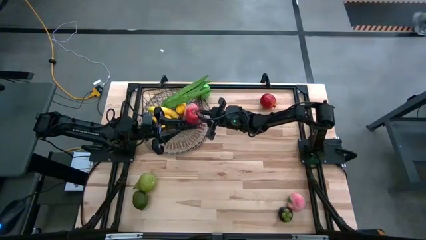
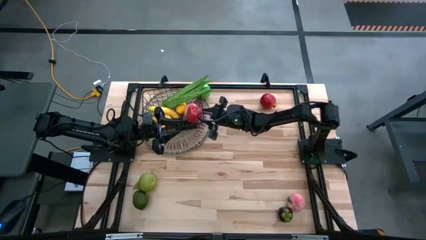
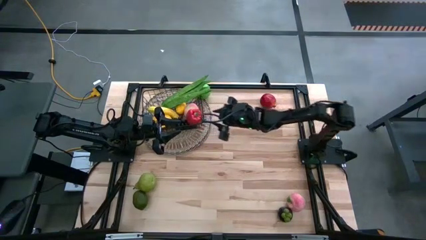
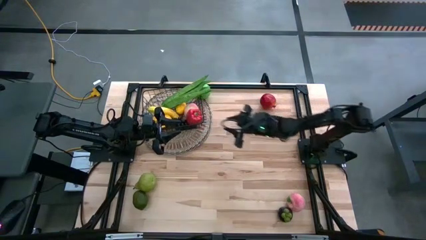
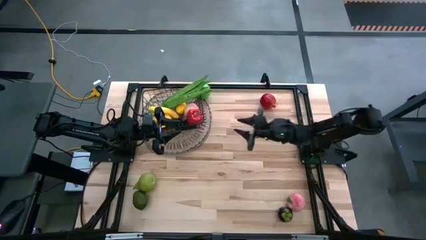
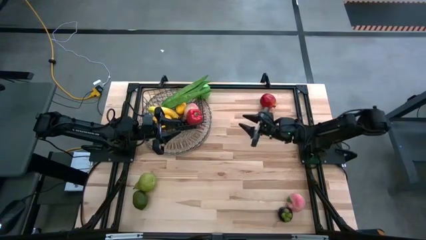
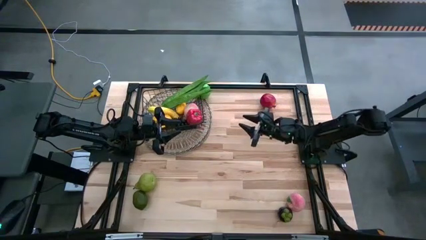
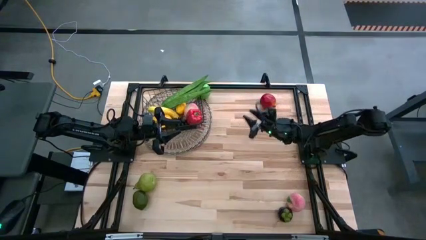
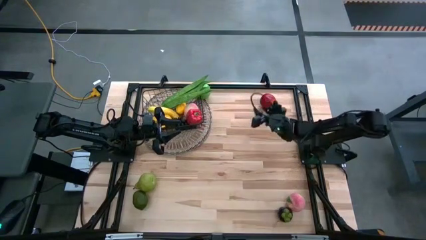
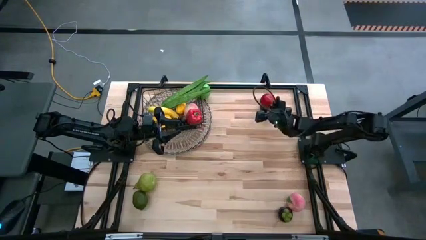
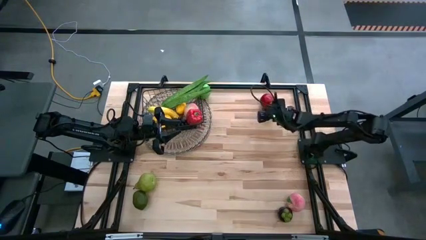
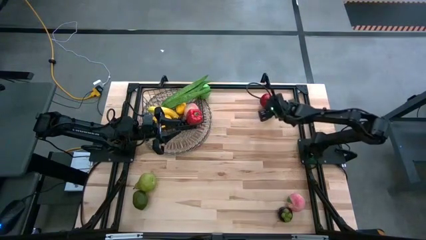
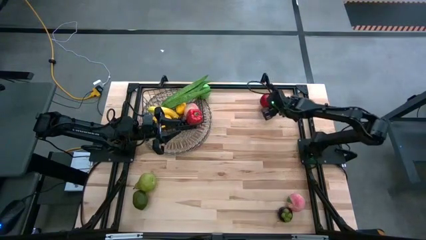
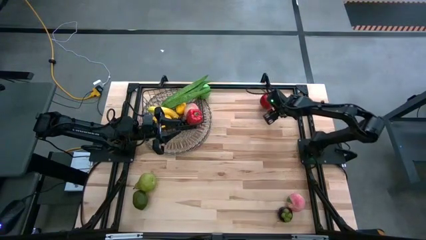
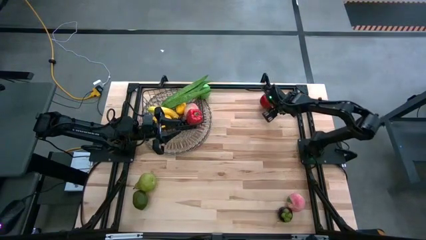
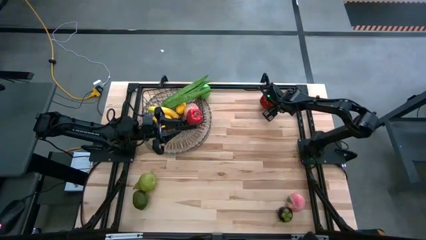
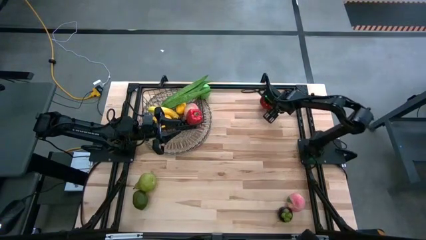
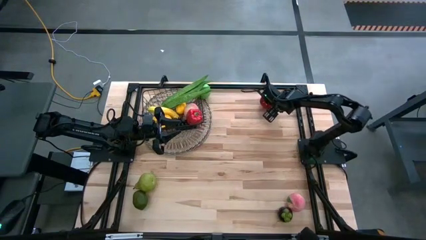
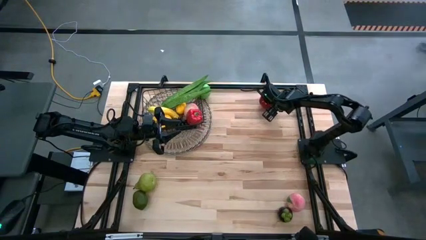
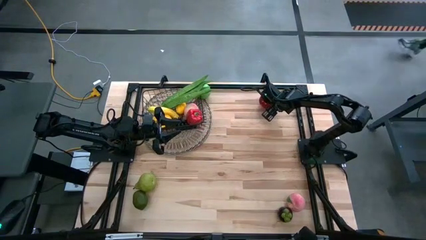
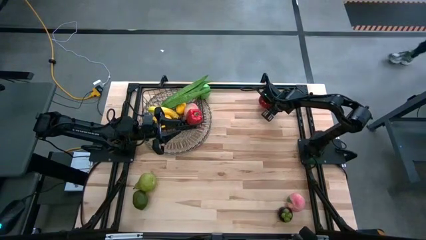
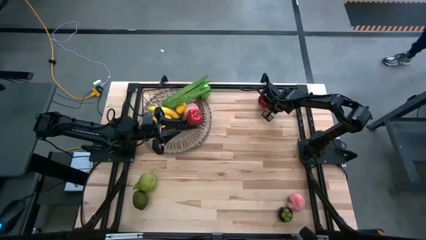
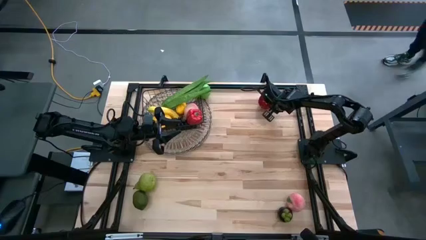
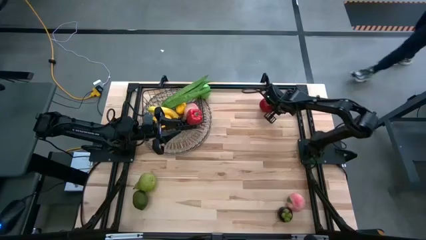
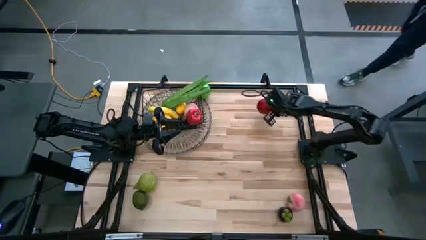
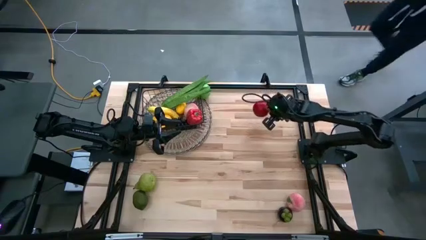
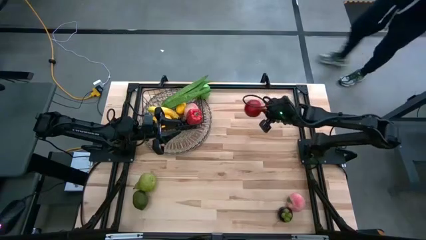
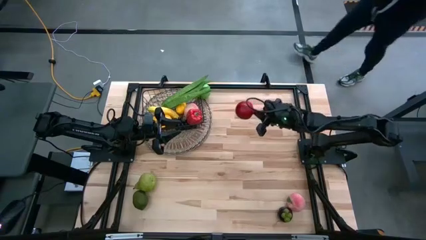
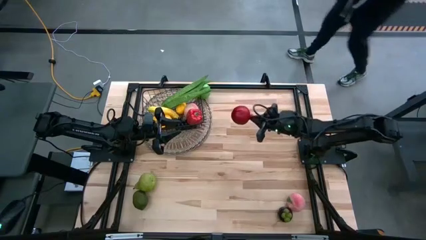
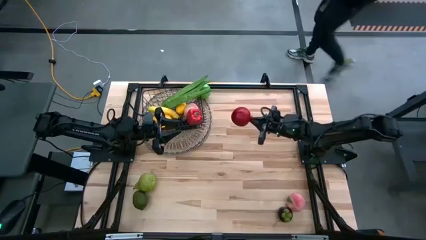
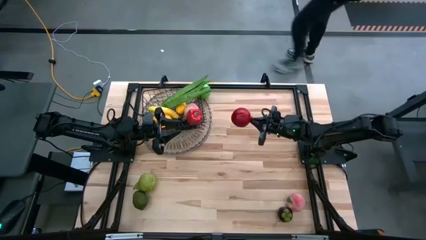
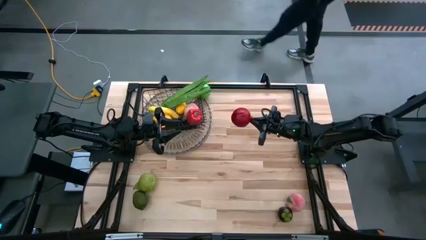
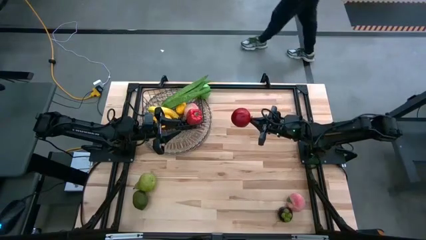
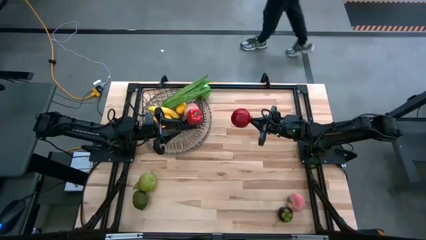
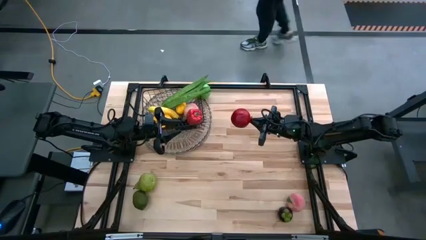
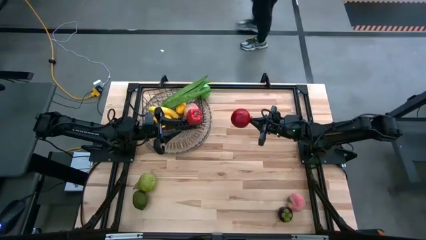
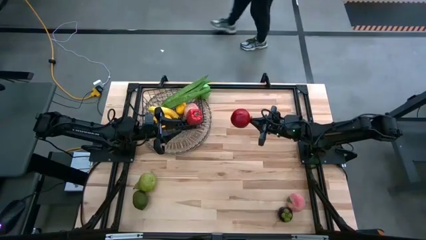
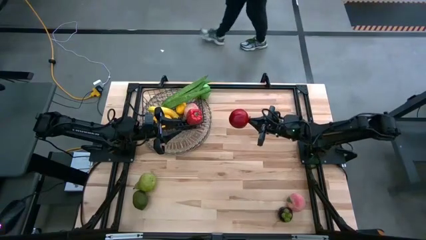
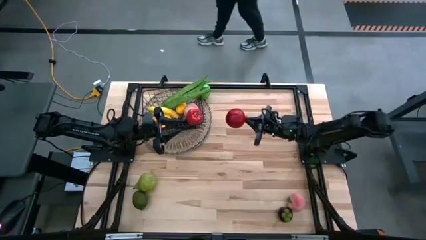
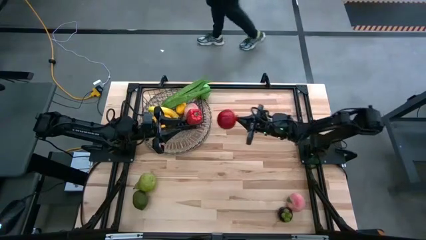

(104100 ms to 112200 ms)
Task: Build produce basket
Put the red pomegranate into the wire basket

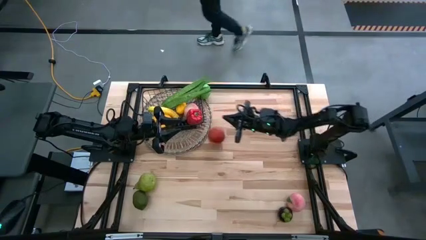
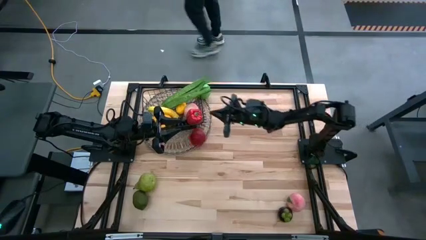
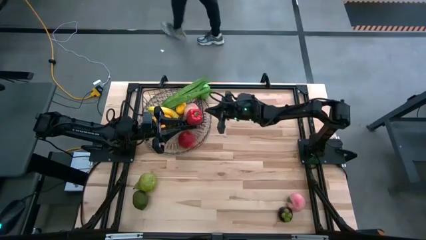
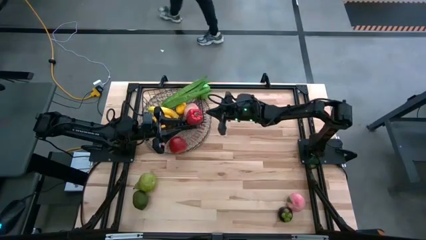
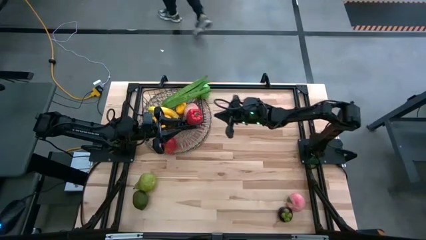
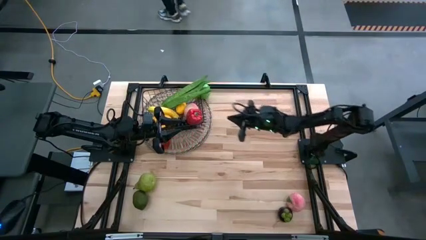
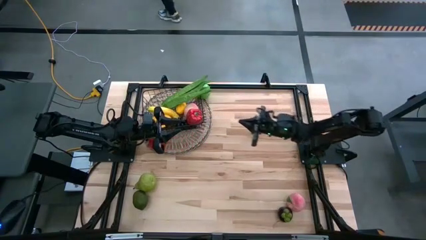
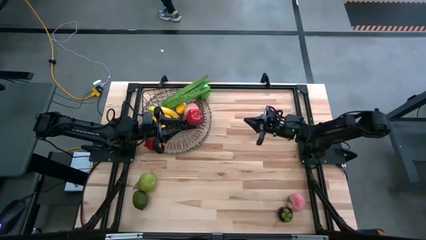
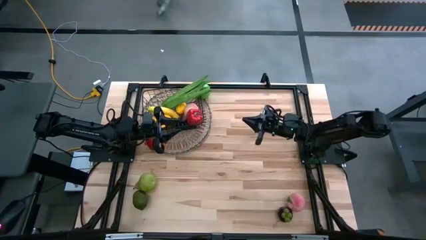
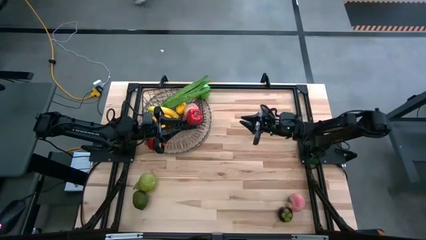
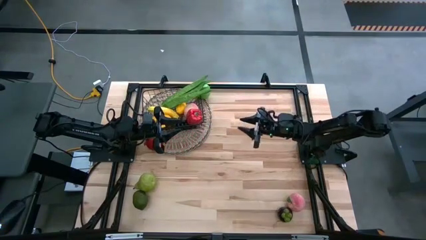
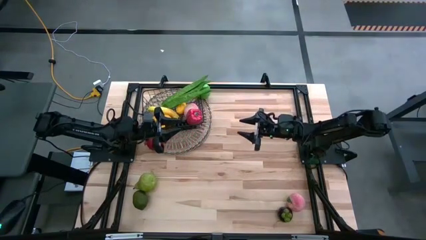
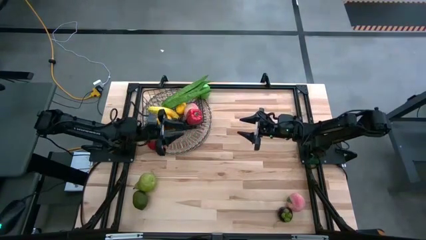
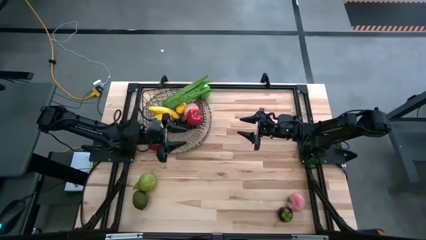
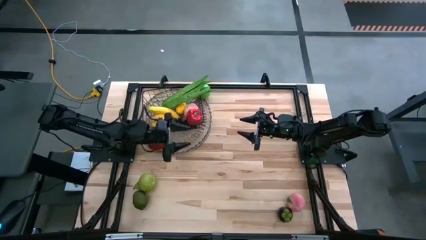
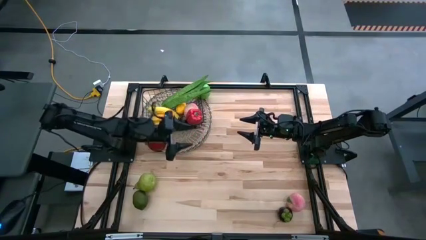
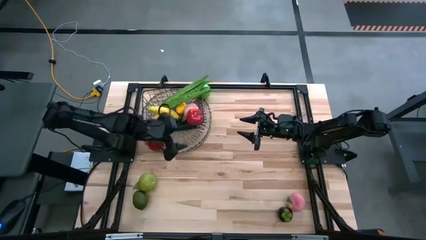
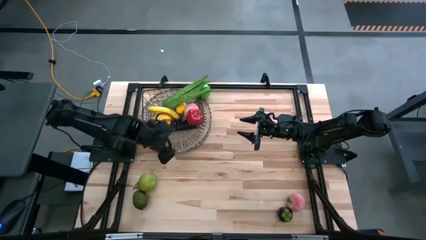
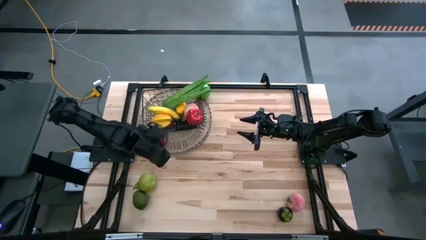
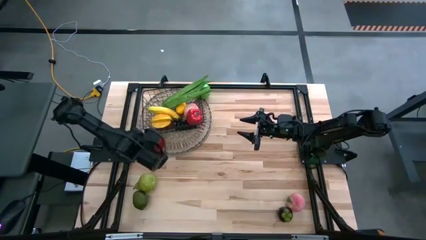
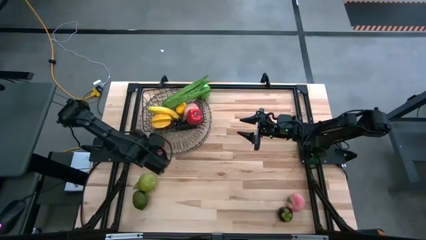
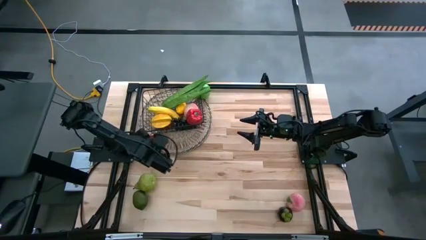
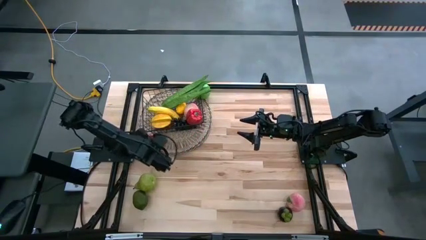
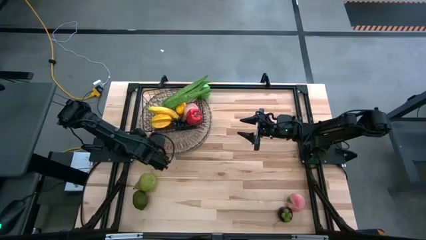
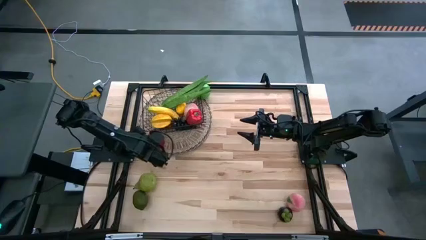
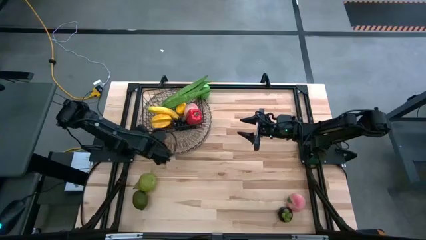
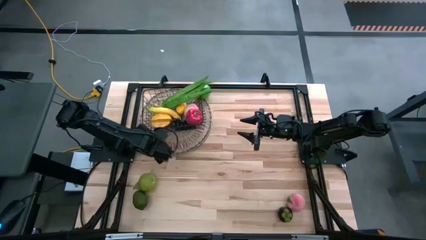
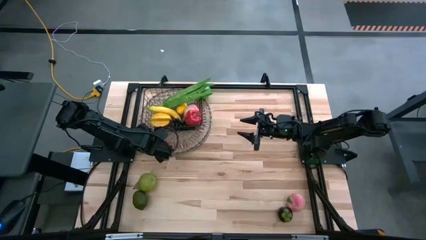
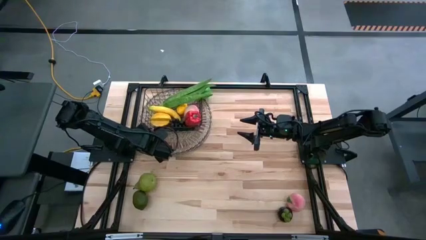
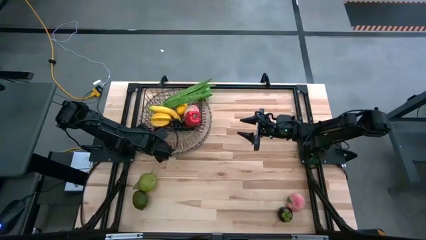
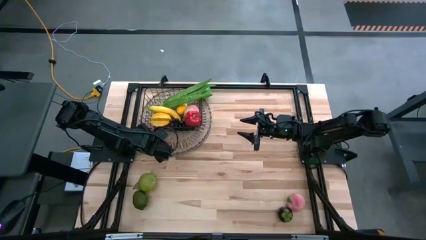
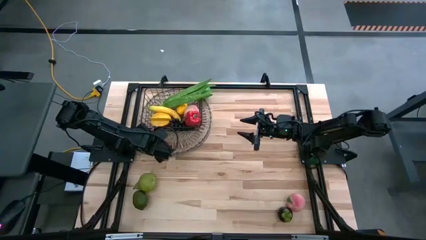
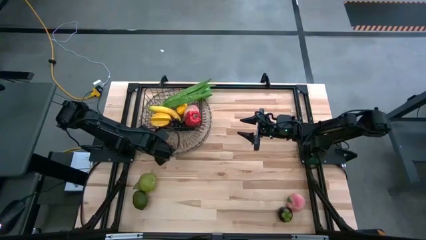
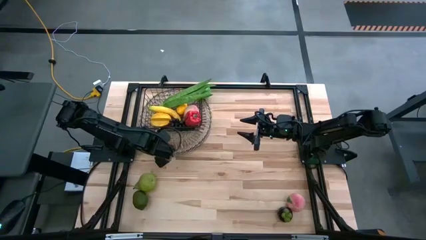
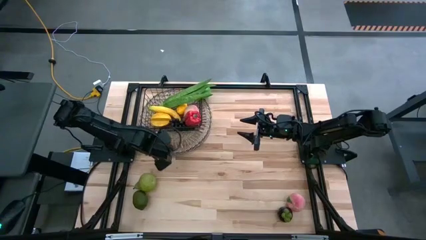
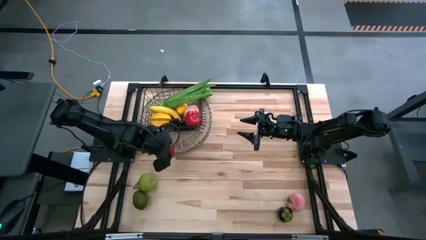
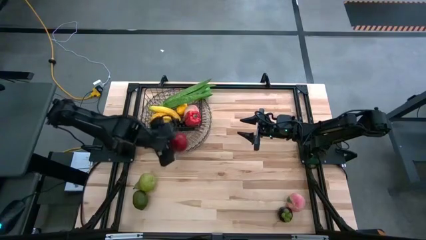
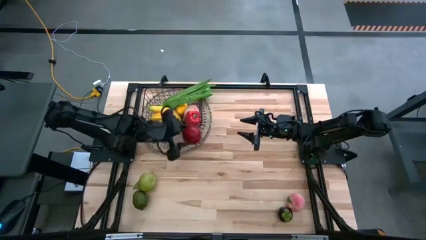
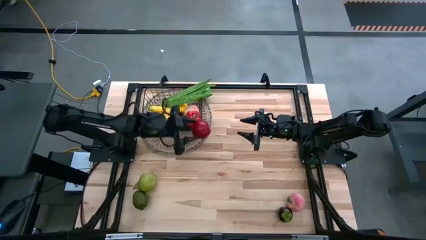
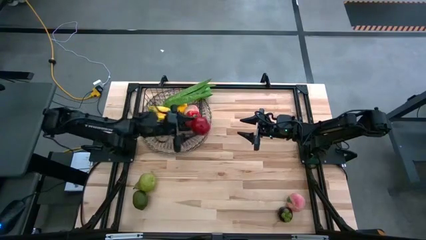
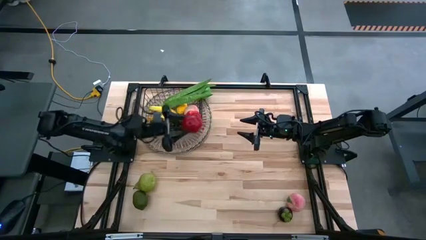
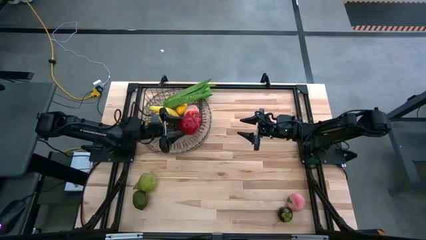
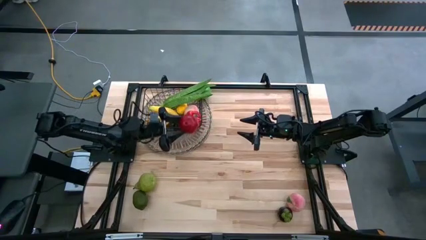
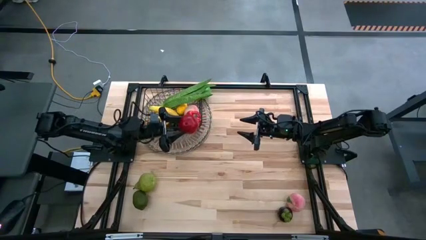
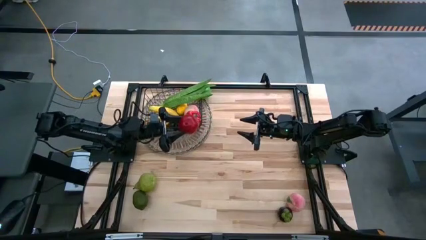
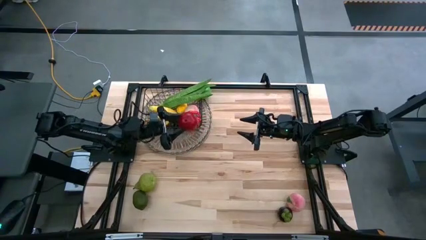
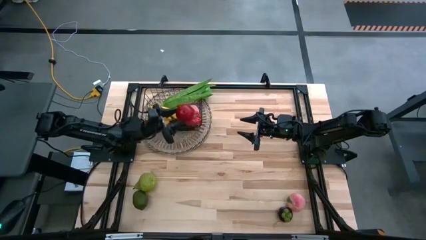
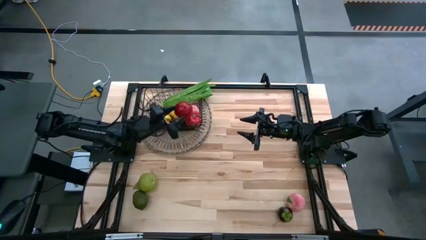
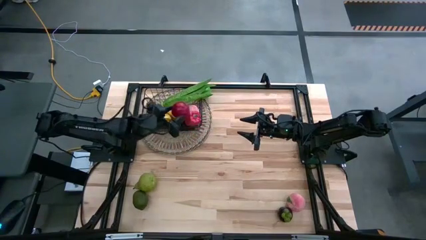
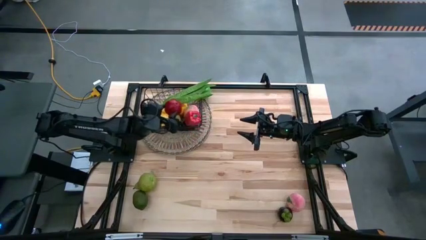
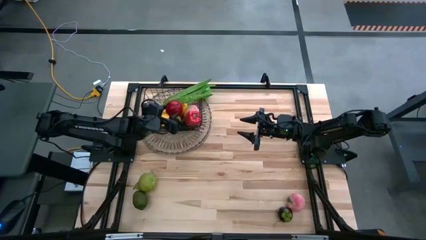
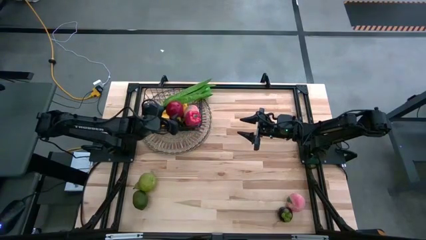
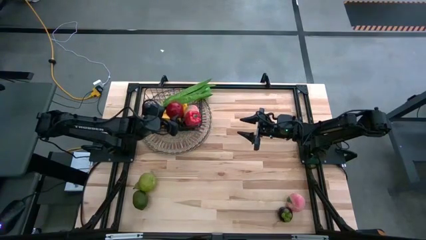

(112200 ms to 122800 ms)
Put the red pomegranate into the wire basket
